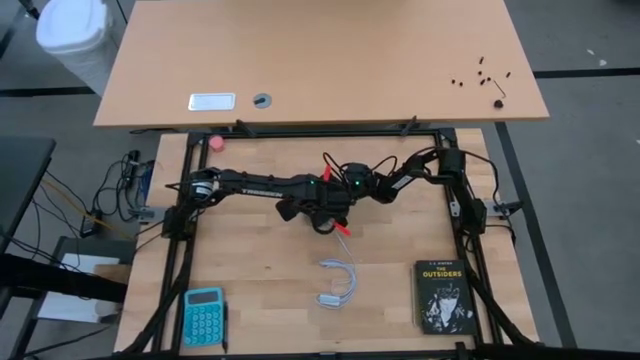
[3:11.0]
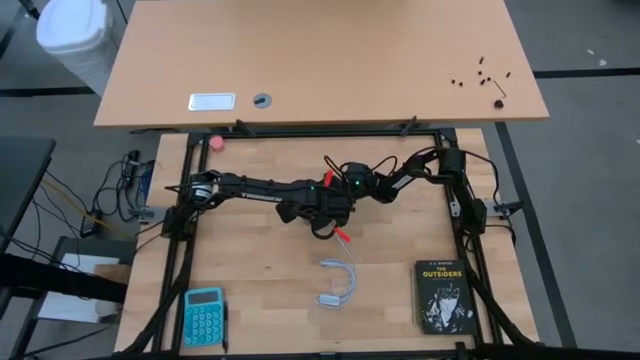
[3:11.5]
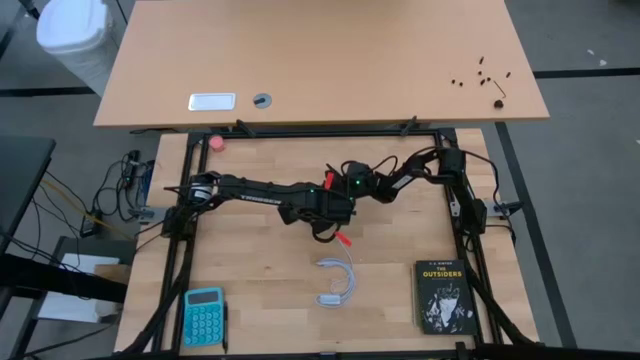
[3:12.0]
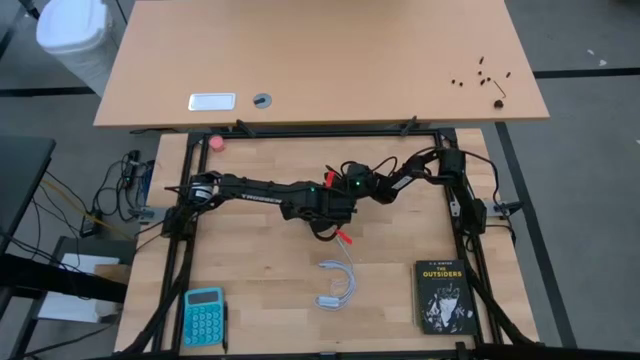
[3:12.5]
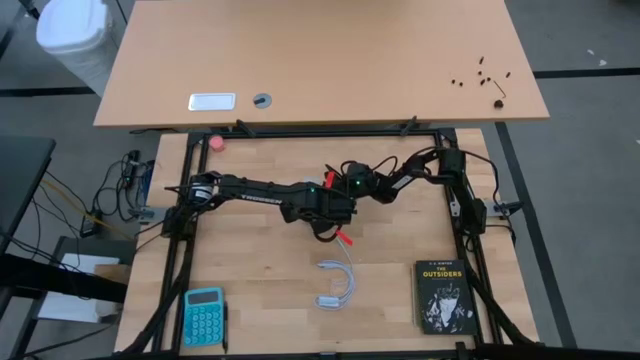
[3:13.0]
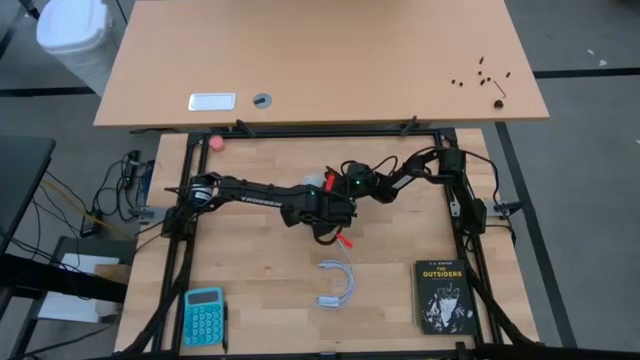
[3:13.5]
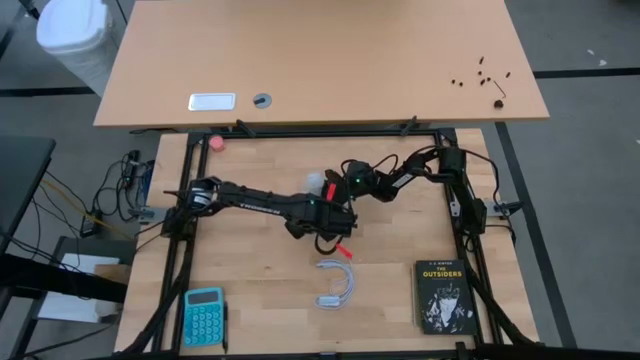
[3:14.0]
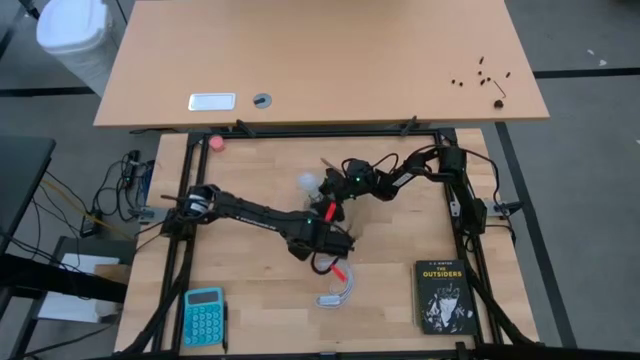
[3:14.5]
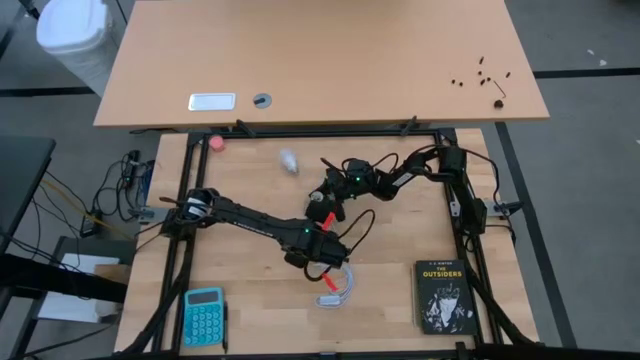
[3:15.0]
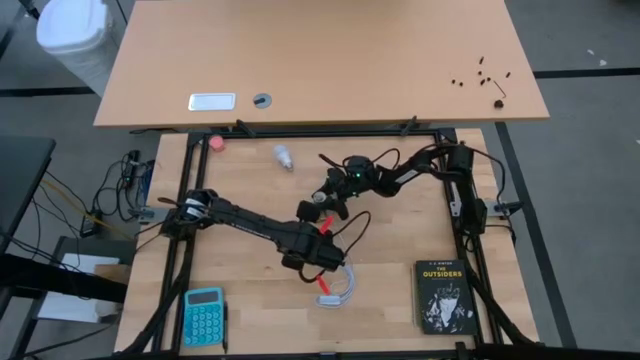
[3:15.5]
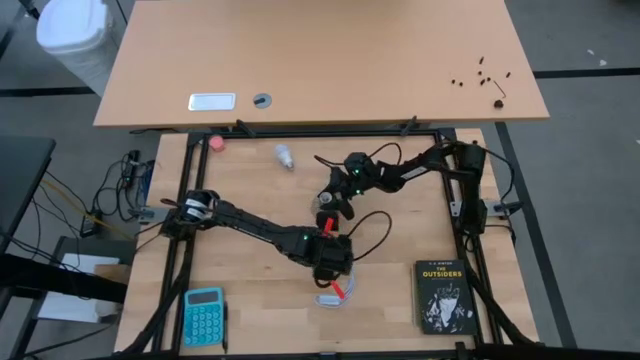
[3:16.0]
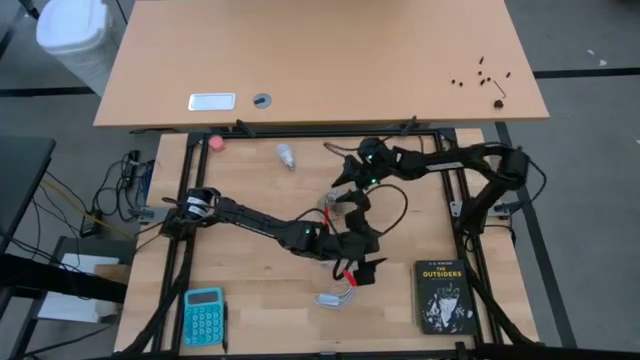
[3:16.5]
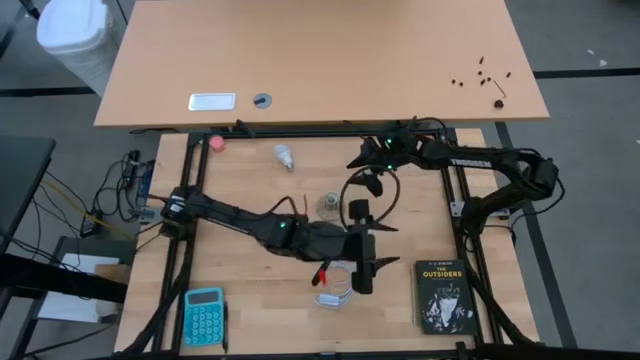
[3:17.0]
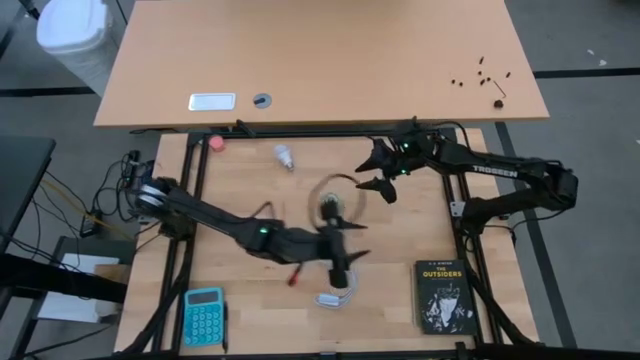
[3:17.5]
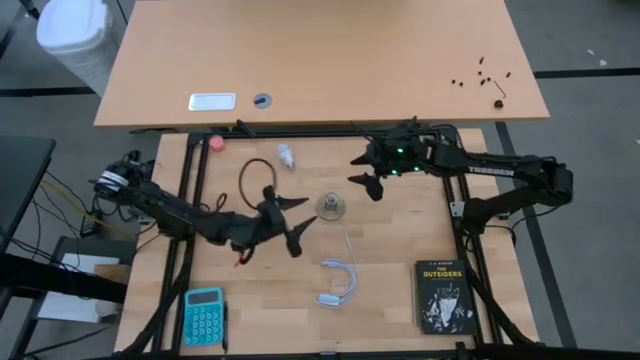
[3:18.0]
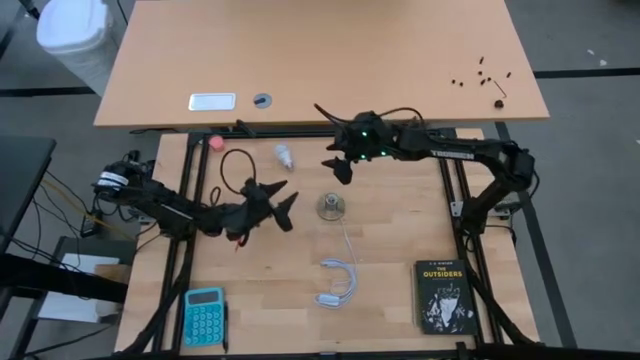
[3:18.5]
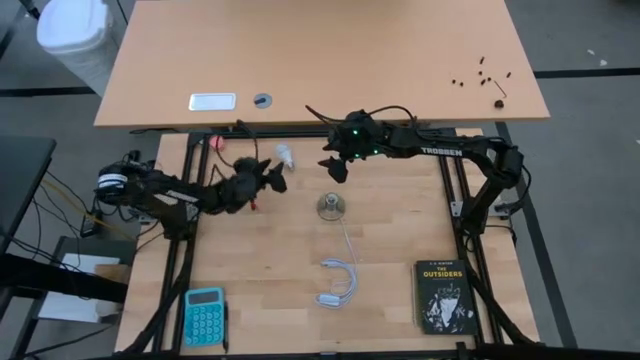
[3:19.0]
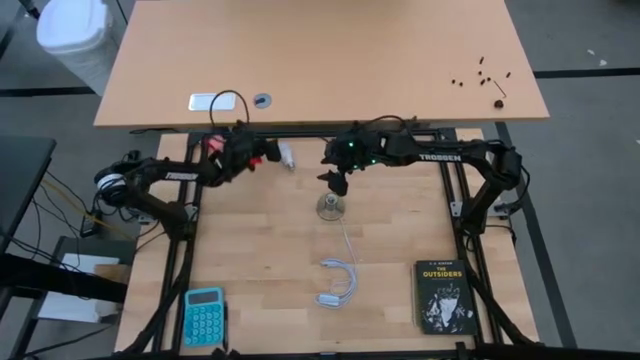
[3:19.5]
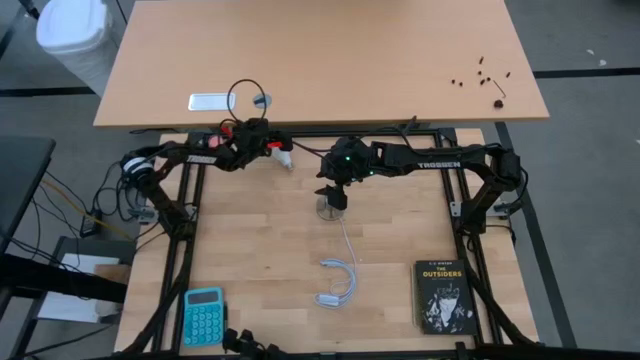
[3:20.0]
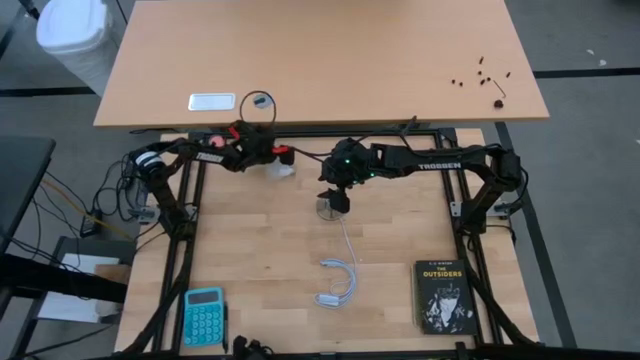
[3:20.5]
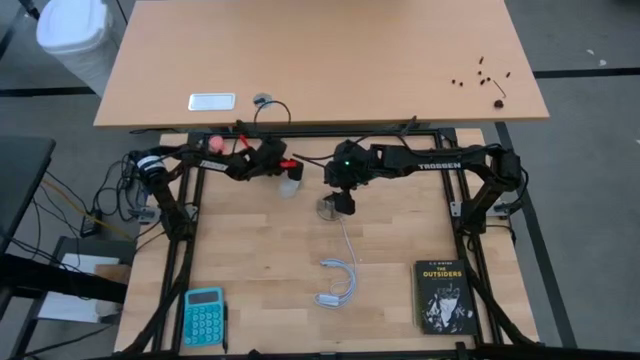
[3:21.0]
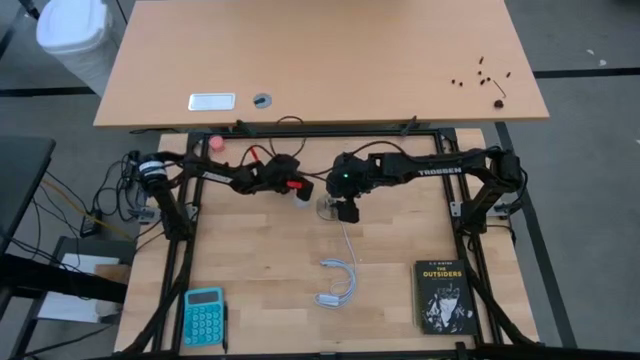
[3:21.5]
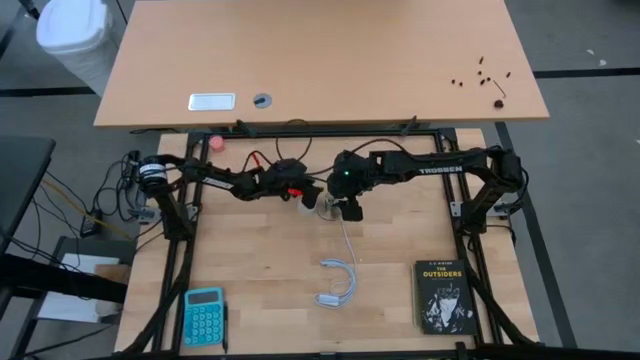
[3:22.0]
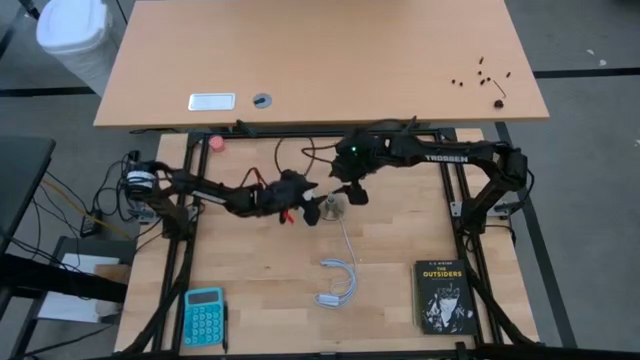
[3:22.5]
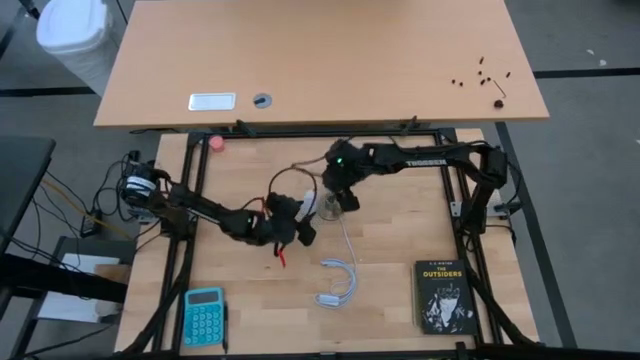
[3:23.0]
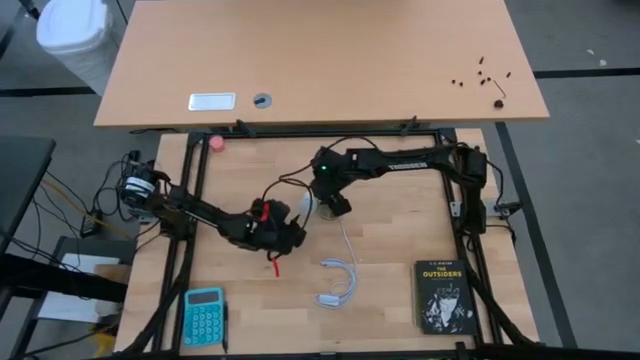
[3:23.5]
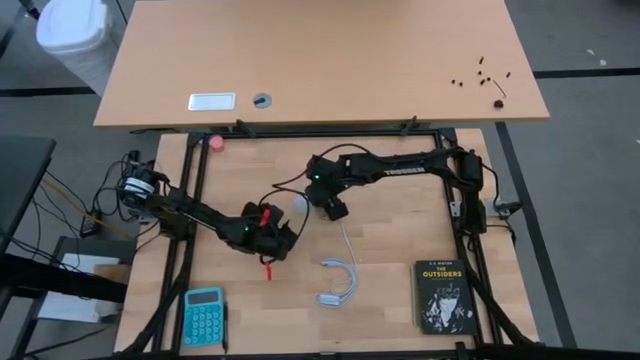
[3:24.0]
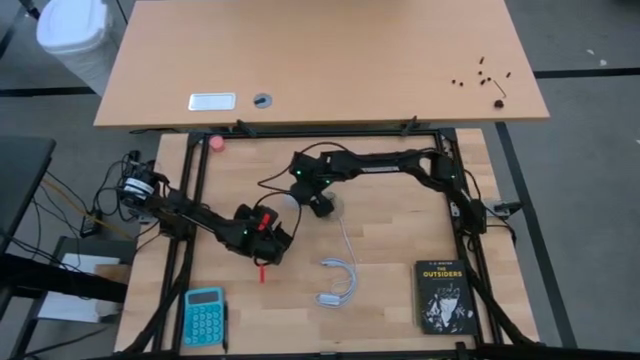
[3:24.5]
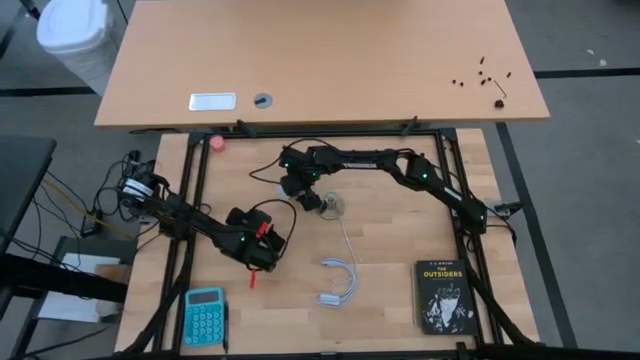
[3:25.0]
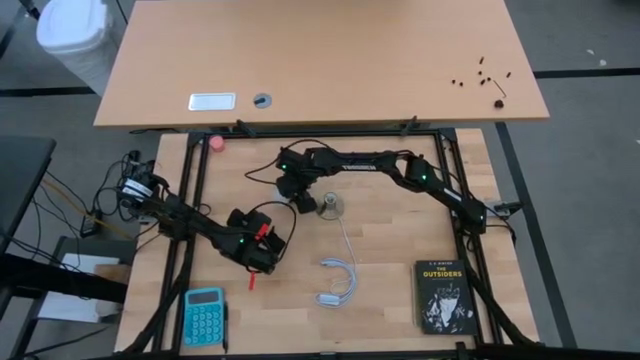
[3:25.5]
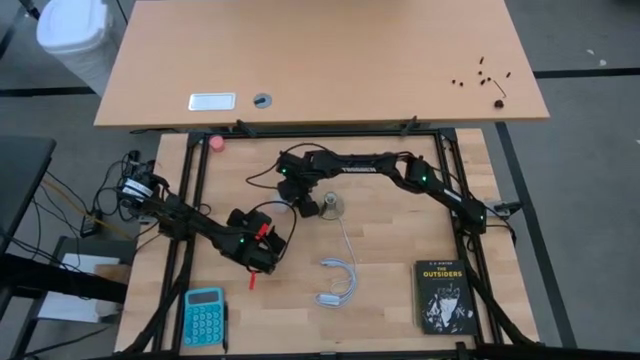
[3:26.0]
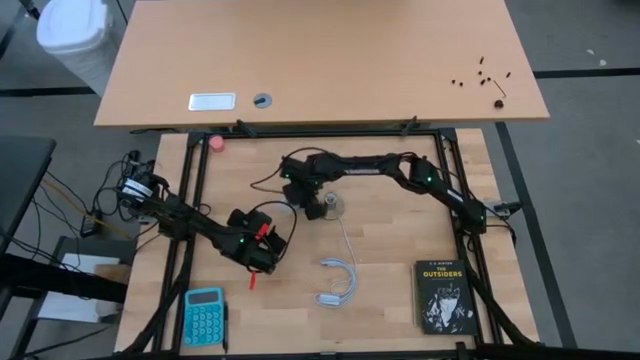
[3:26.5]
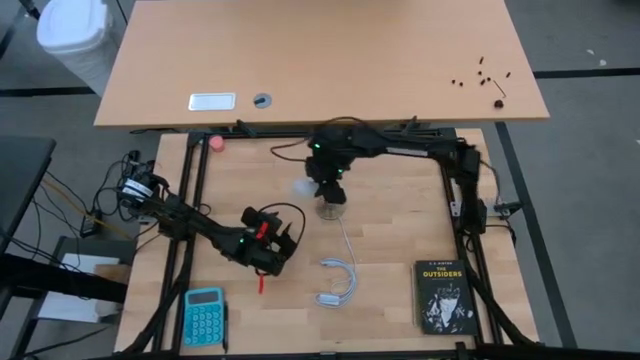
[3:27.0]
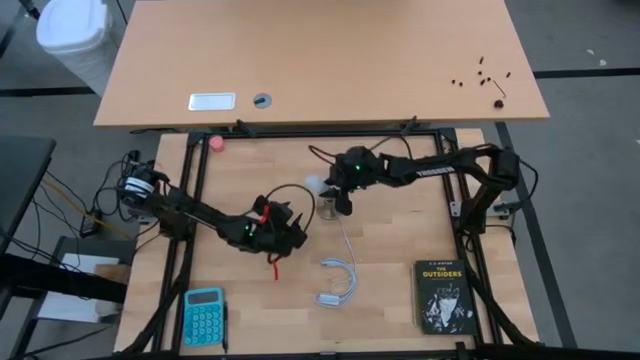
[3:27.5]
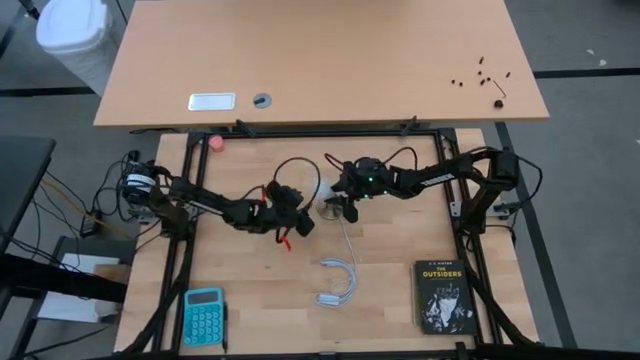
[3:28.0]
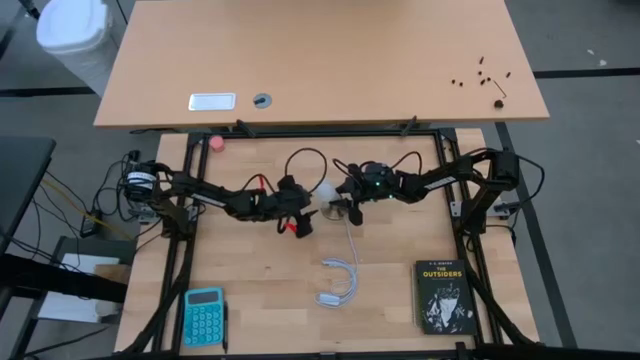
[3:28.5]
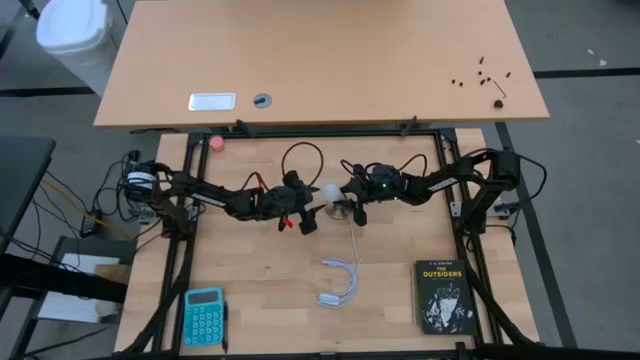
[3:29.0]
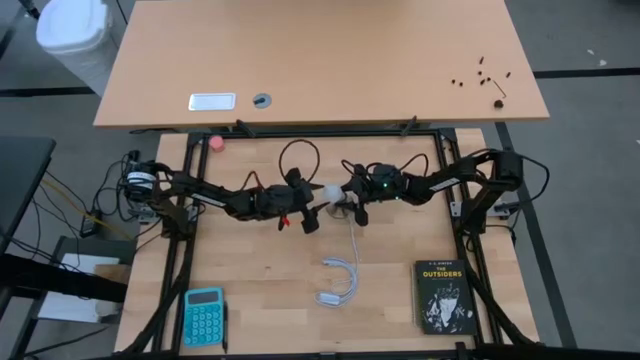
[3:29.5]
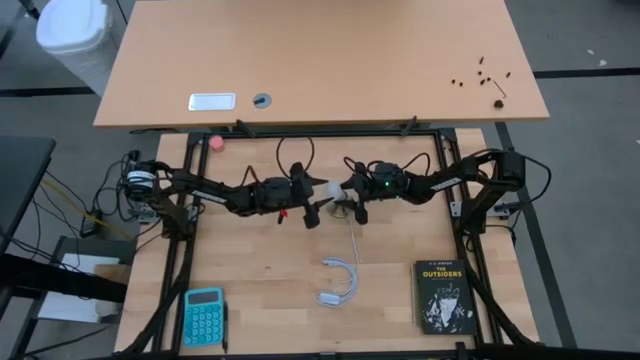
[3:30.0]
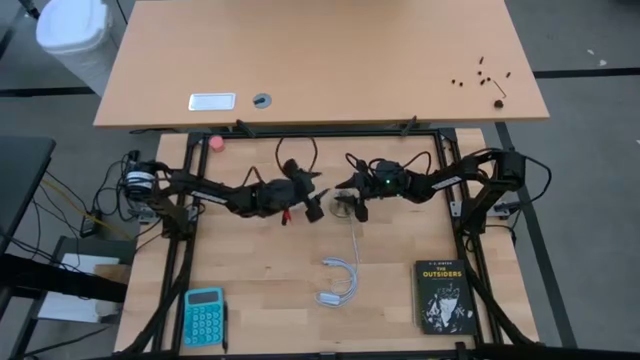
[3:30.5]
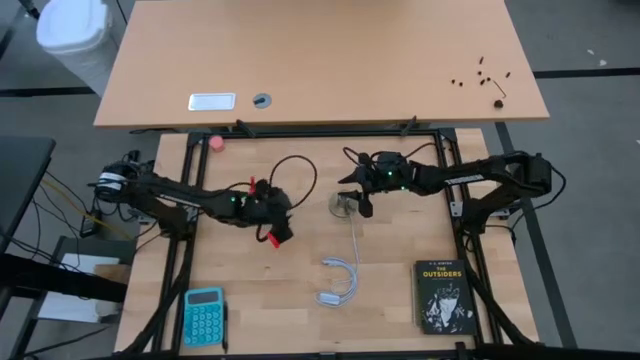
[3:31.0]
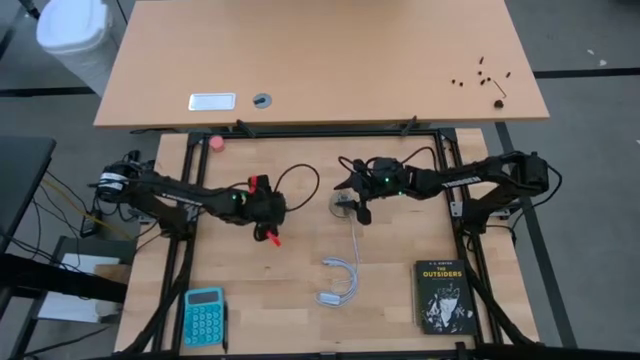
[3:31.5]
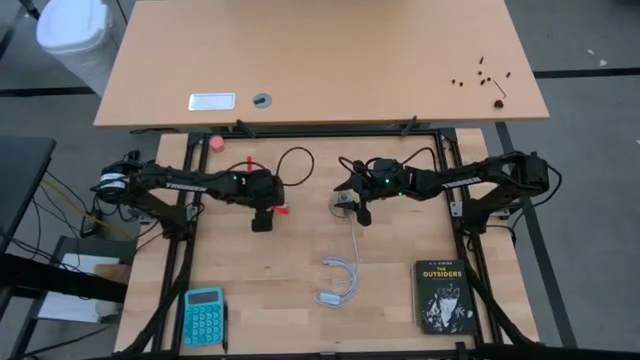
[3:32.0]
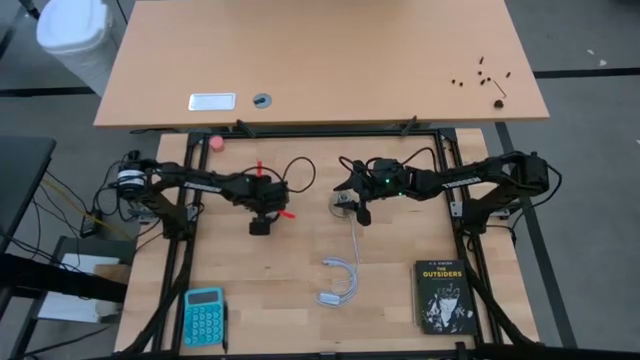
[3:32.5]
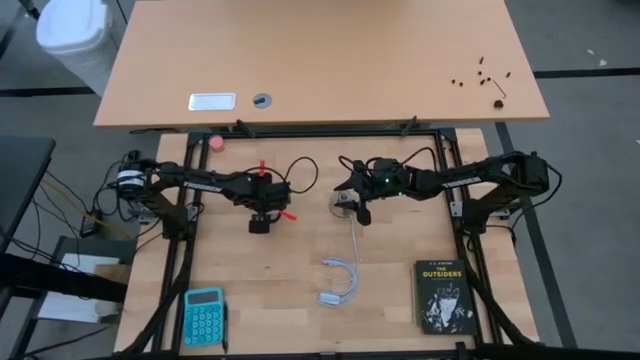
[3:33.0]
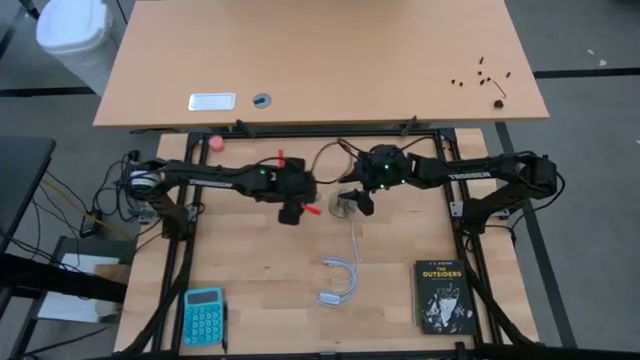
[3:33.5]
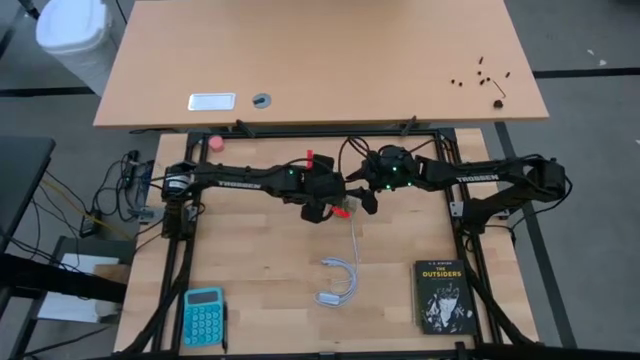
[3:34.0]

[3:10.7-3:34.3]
Task: Screw lightbulb
Insert the white lightbulb into the silver lamp
